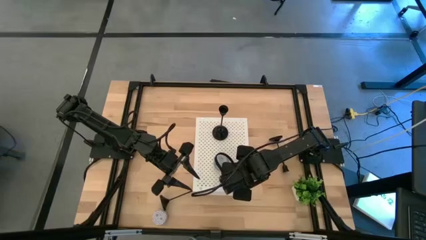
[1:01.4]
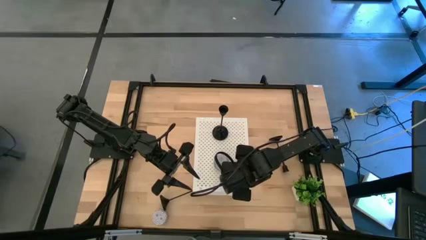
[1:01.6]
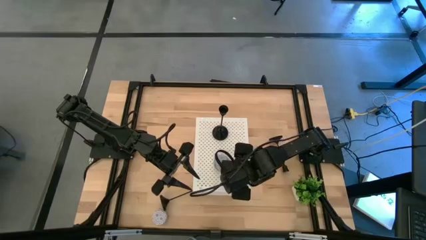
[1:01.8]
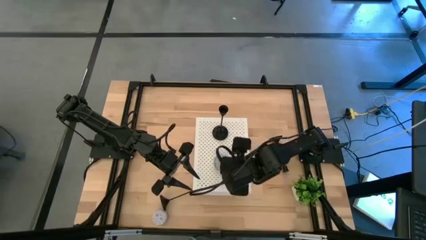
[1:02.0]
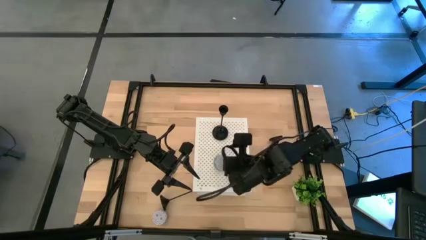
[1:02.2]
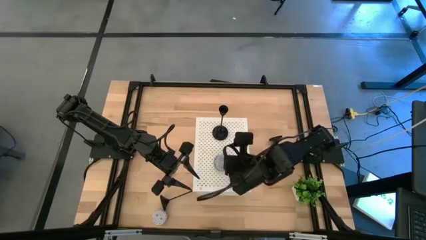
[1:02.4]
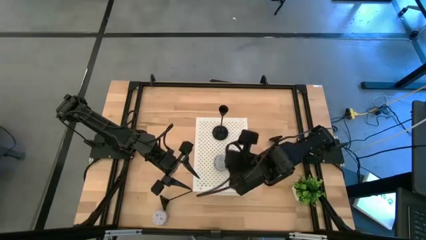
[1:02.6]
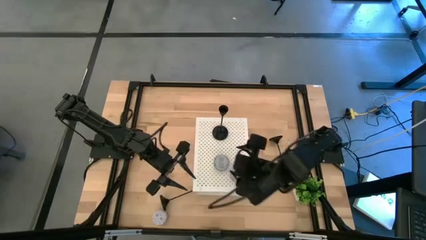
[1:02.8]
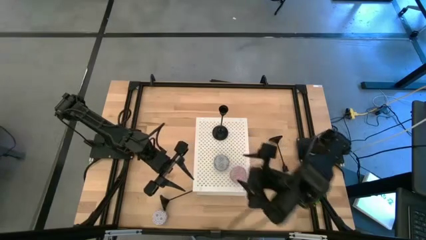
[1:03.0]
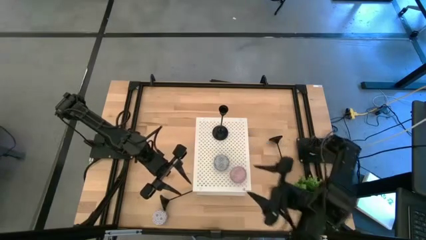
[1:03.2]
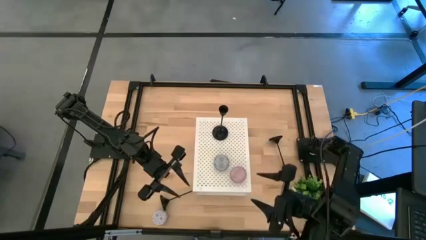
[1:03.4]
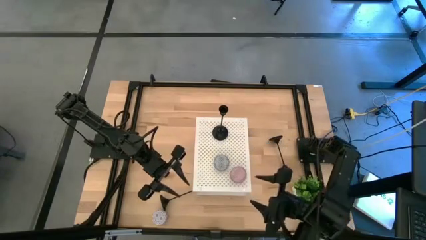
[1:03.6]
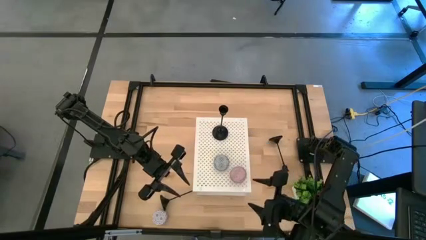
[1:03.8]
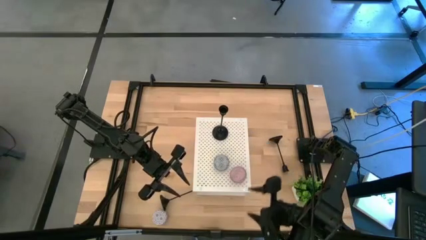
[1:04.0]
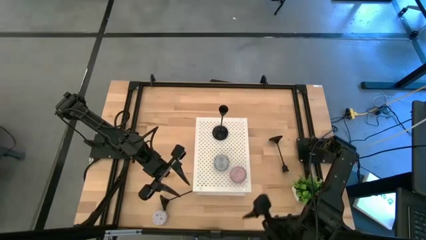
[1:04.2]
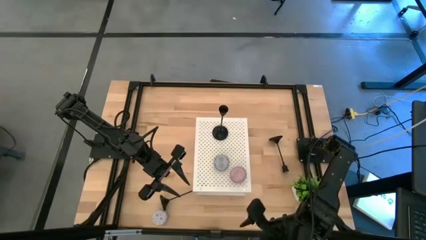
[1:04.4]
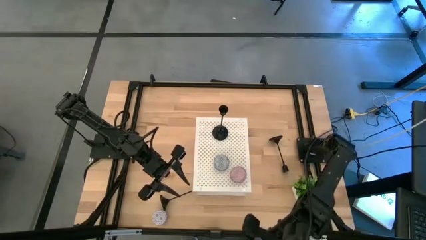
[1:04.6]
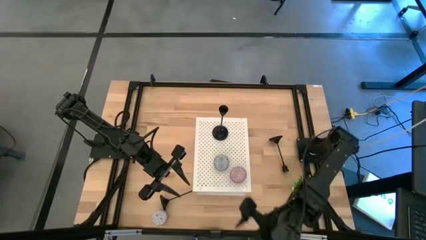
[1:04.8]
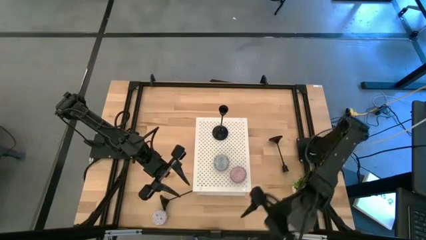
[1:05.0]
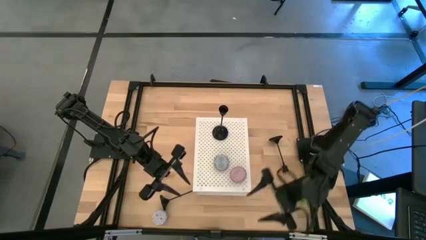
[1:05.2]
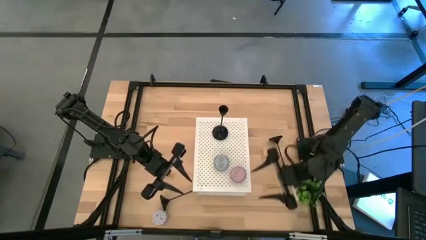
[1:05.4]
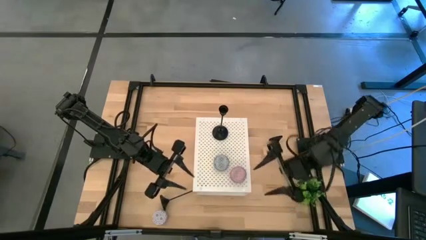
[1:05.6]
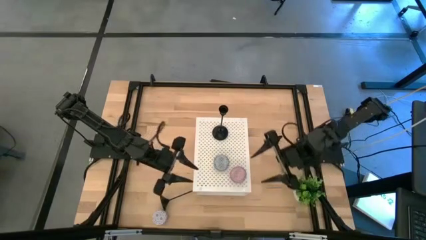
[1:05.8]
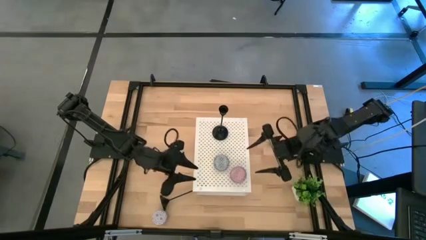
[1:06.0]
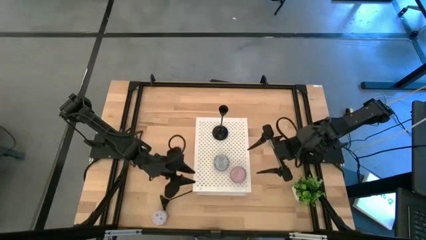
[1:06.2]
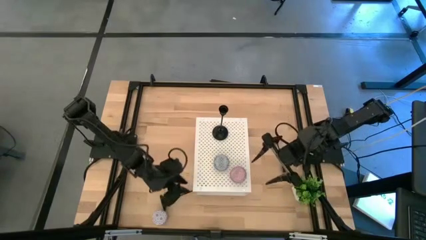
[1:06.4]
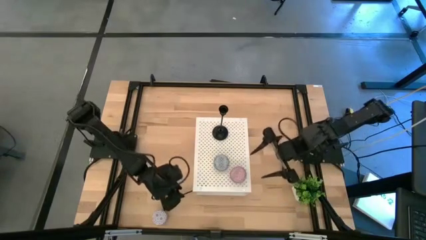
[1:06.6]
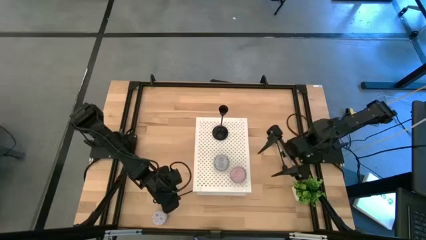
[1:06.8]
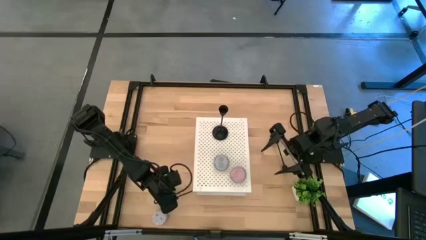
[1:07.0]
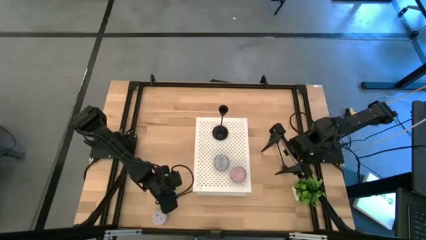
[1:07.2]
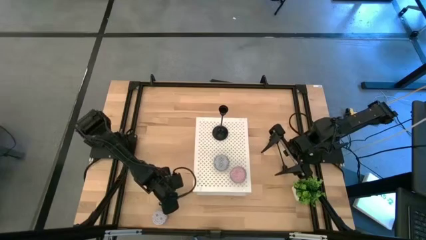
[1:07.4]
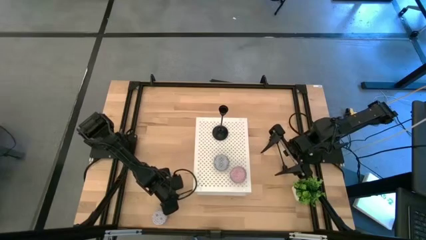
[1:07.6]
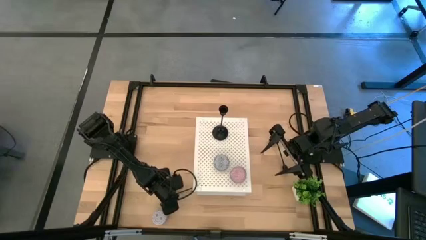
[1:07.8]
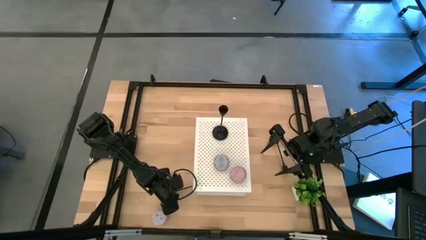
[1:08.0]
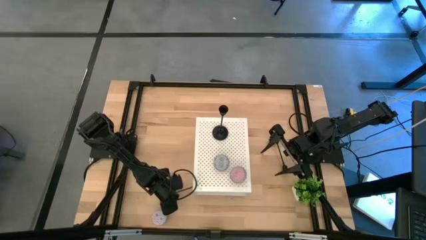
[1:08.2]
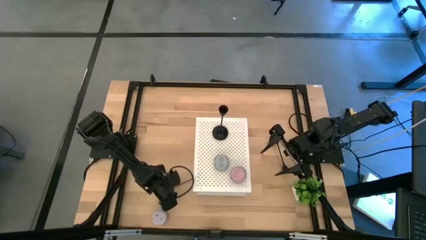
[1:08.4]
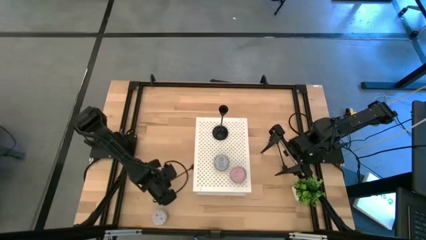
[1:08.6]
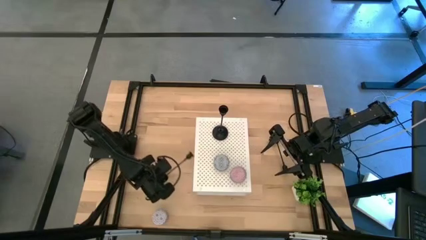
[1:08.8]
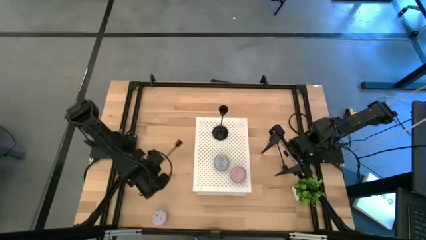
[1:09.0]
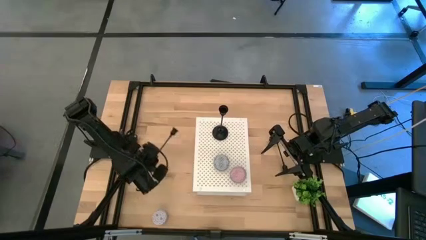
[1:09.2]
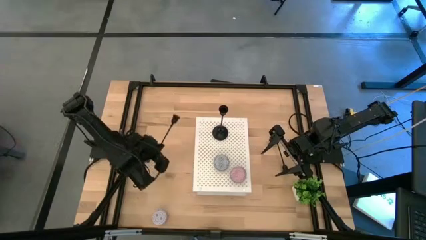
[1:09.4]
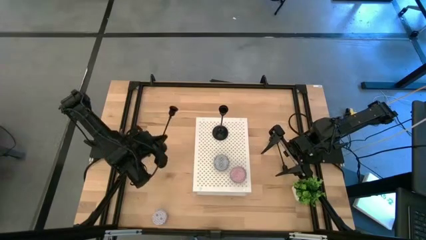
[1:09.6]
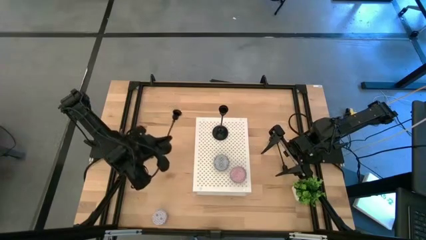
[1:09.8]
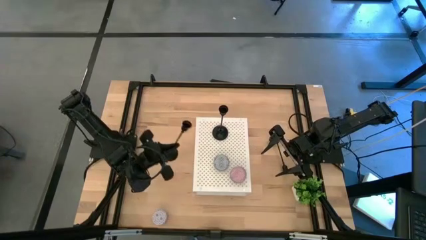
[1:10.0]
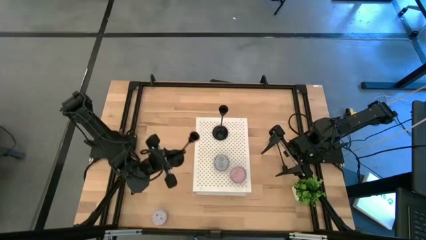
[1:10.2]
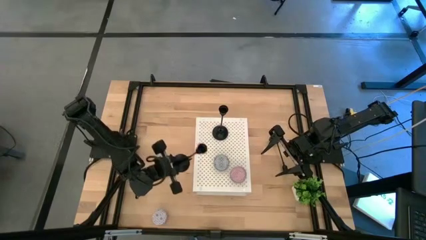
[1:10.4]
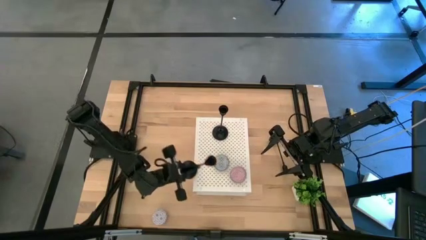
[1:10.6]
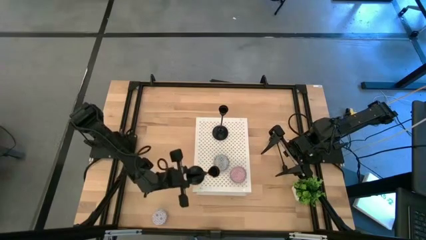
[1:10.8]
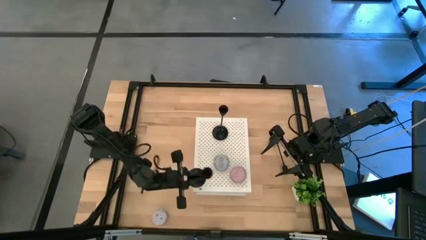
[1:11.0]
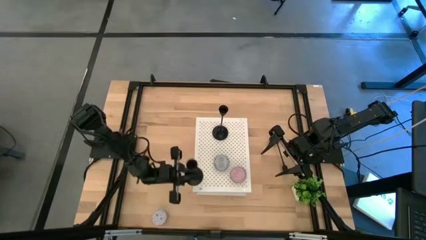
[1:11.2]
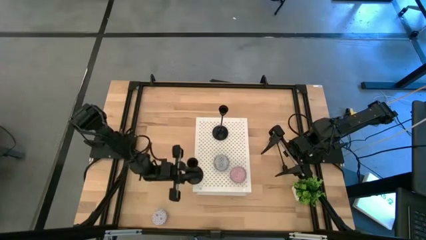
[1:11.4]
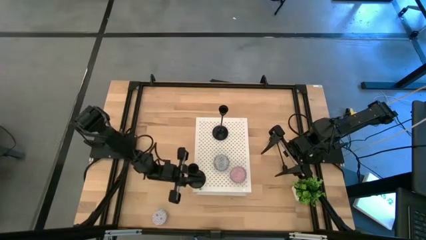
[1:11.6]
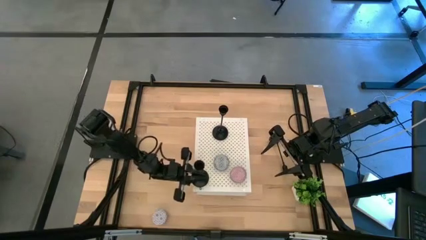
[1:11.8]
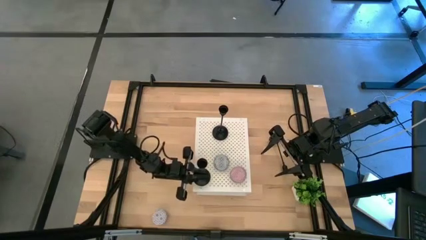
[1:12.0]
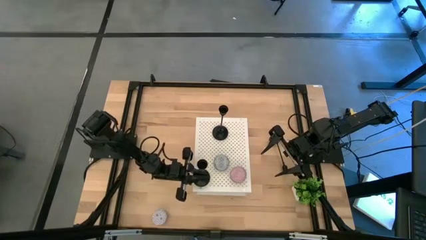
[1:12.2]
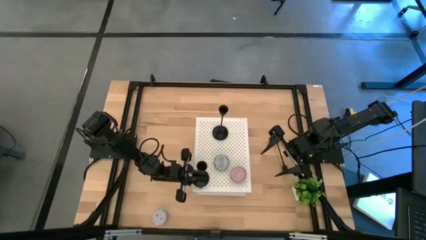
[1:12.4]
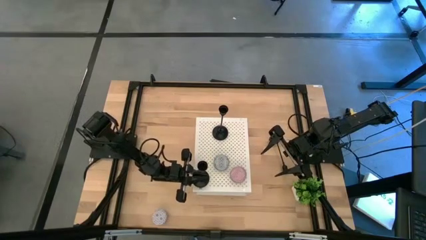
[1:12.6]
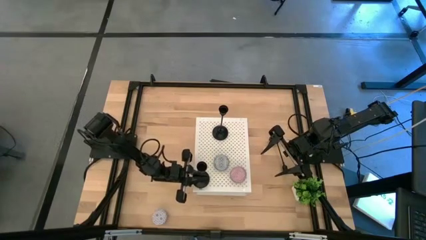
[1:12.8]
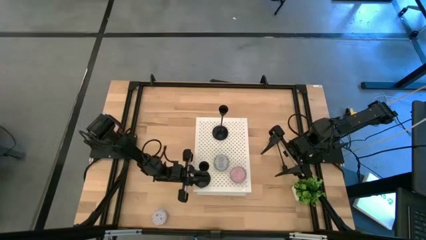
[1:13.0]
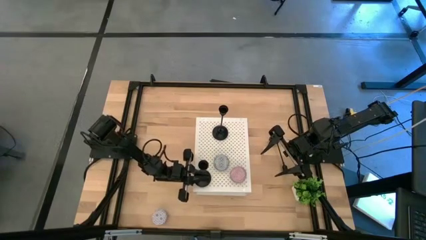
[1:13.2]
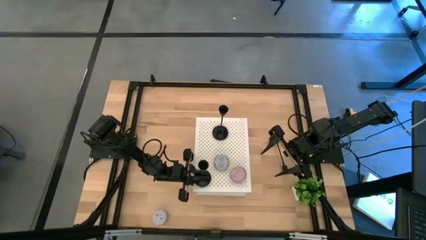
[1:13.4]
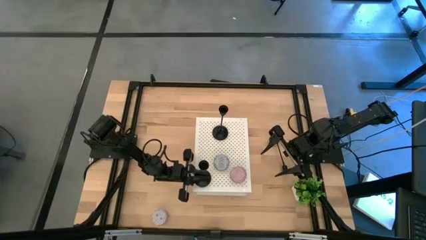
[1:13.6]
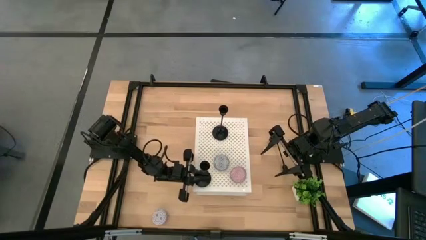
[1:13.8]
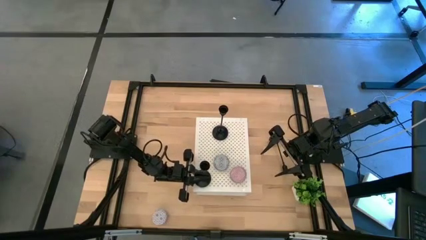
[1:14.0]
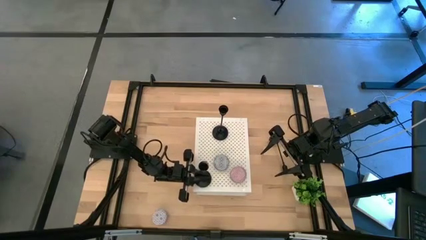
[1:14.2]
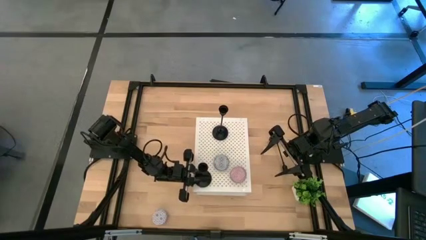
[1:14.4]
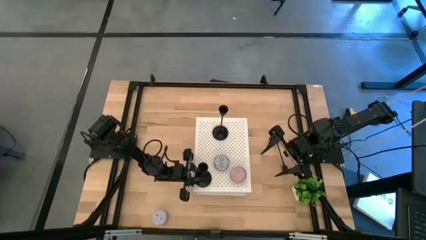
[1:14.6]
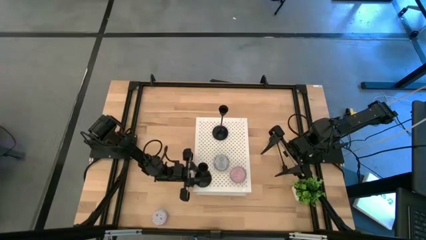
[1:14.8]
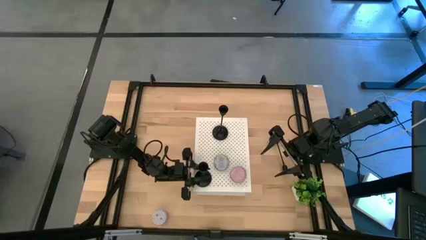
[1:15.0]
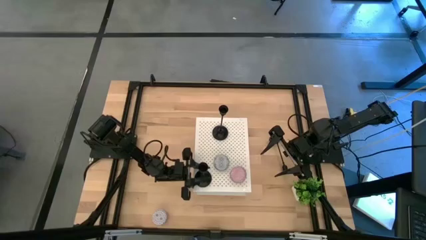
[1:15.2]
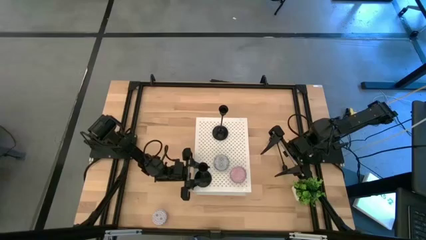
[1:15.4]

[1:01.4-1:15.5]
Task: Pick & Place candle stick holders
Put the left candle holder on the shelf
